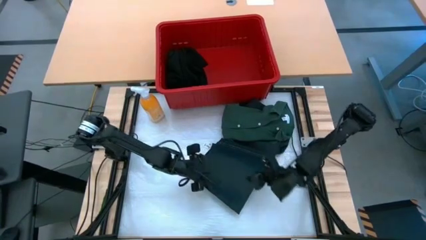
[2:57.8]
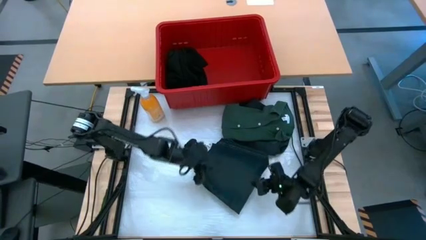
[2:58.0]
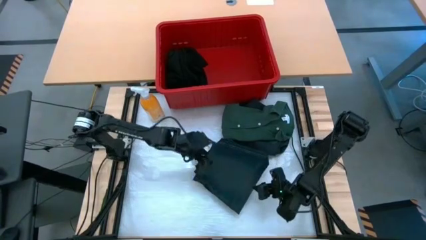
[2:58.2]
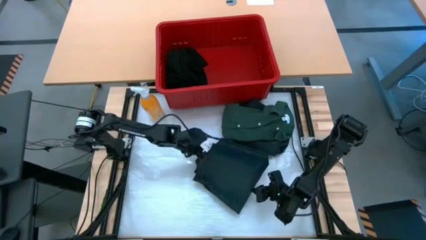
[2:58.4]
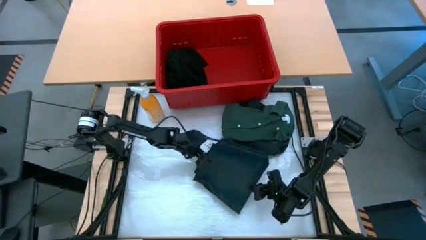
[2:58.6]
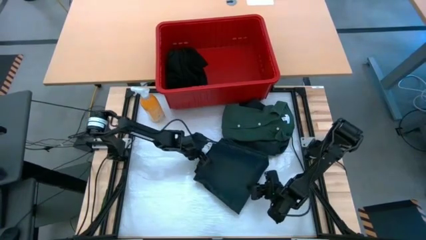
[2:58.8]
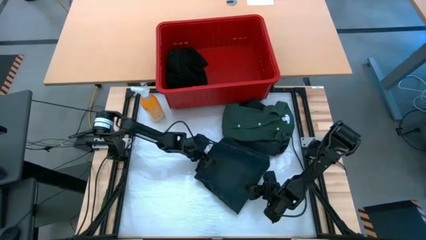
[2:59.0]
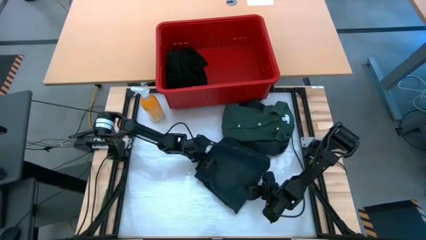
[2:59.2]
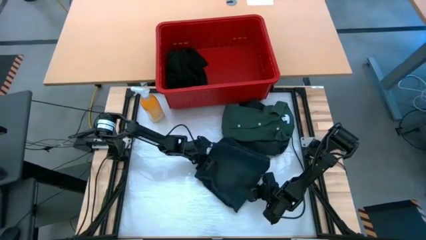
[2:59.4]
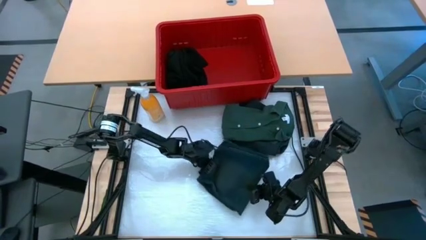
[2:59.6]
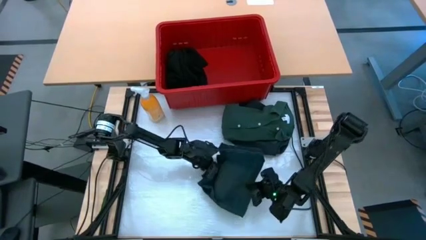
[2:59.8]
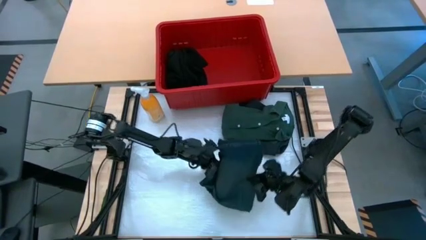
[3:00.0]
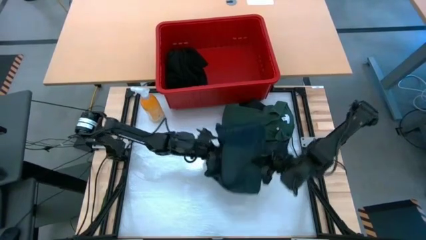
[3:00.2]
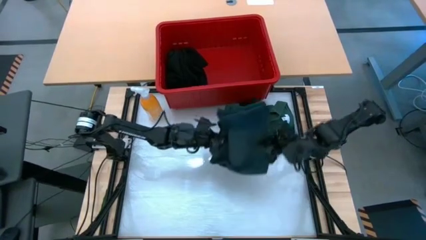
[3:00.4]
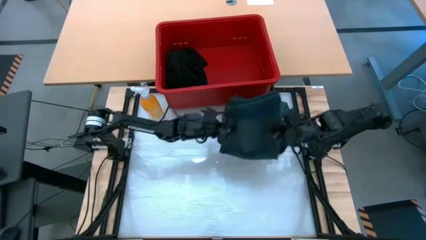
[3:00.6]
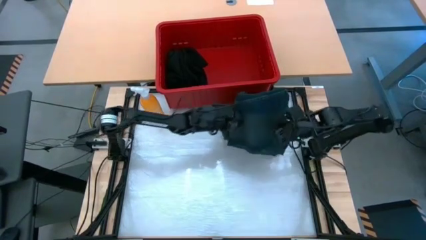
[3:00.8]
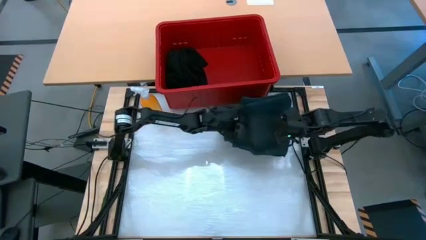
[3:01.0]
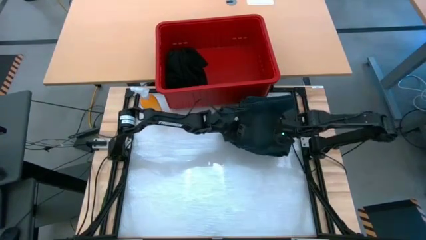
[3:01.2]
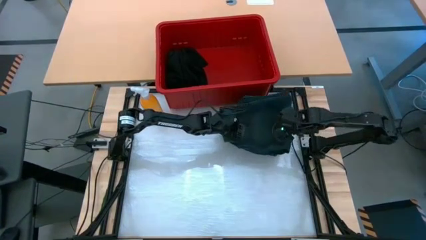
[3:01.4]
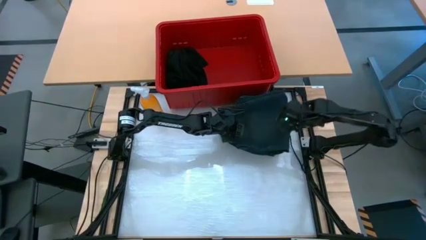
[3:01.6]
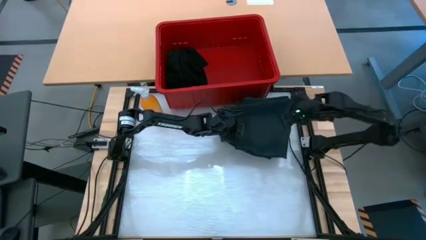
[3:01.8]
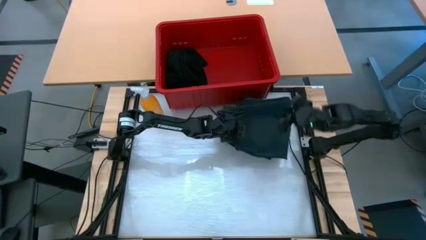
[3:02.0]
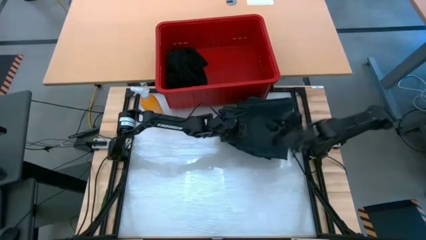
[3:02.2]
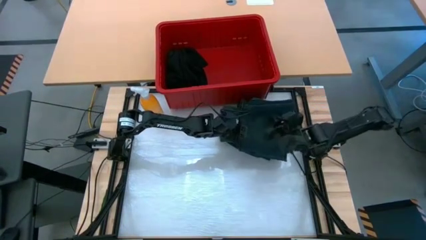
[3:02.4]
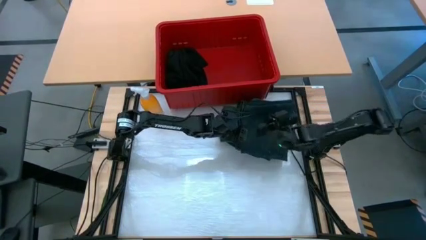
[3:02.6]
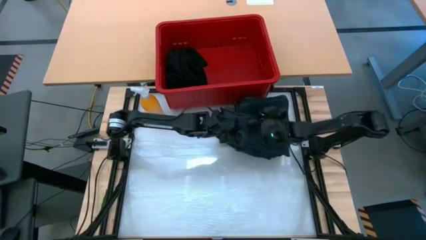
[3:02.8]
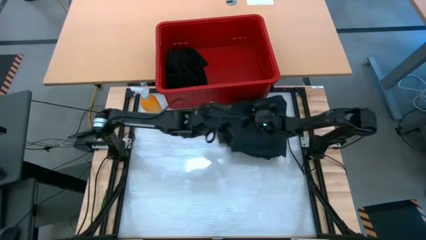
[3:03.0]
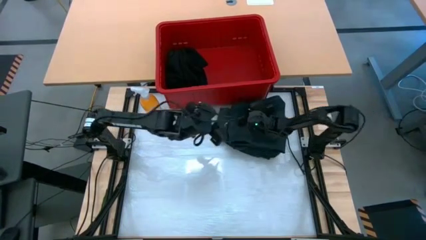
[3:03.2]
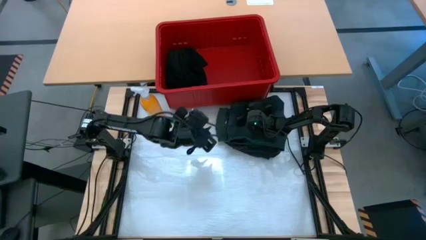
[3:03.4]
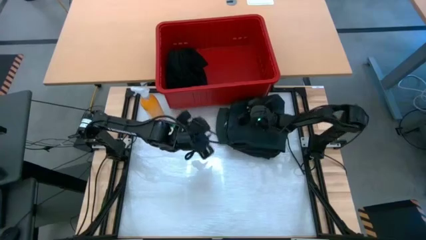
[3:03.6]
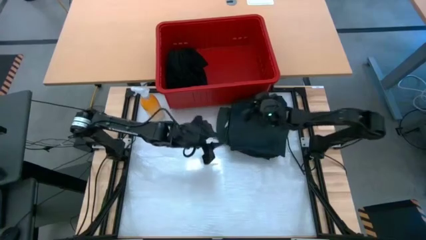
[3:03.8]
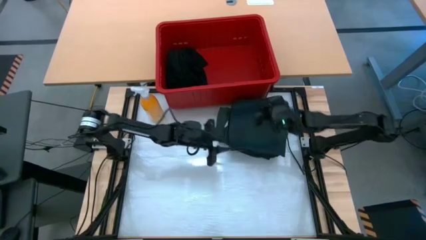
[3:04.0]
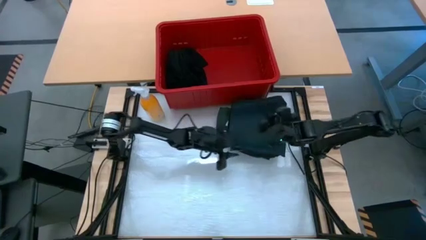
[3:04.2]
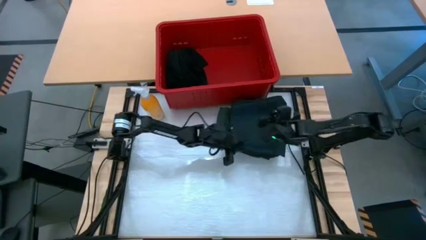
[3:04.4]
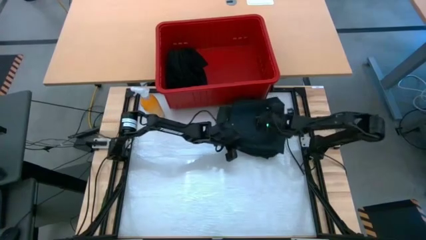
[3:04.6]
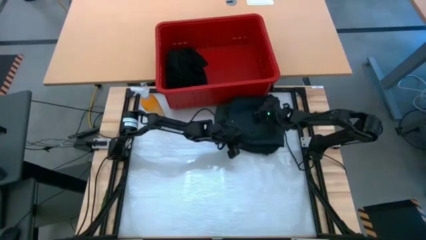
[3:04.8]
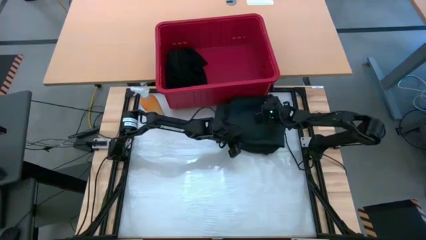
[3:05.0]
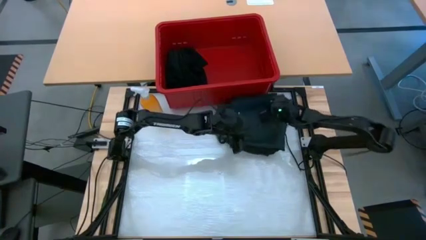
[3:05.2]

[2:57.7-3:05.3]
Task: Fold Laundry from Bin
Stack the blue pants on top of the green polo shirt

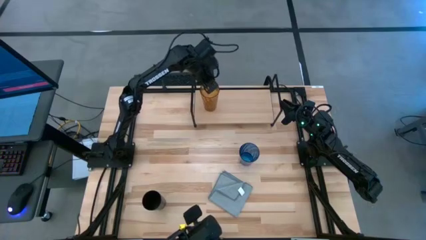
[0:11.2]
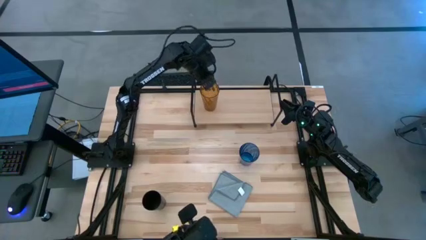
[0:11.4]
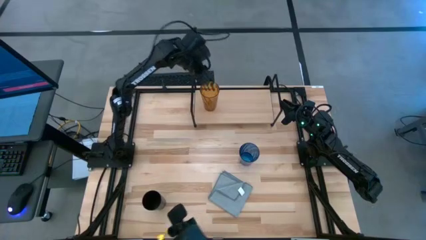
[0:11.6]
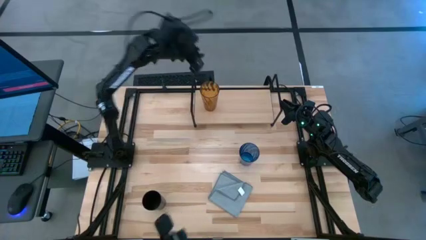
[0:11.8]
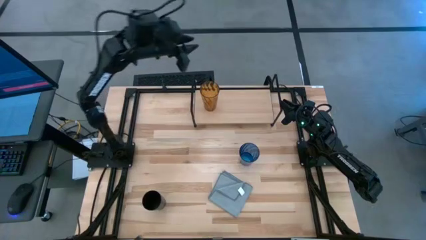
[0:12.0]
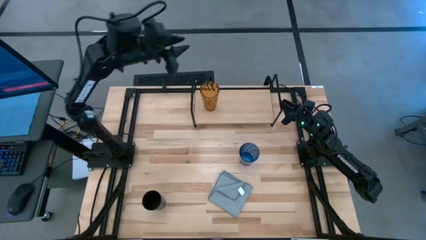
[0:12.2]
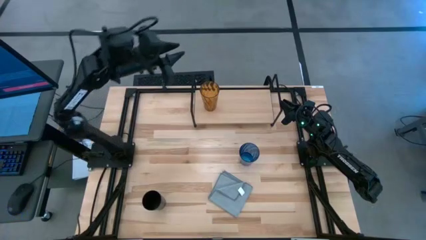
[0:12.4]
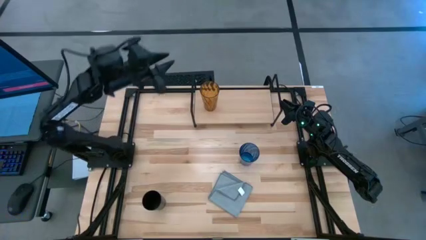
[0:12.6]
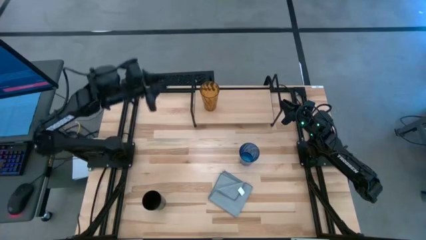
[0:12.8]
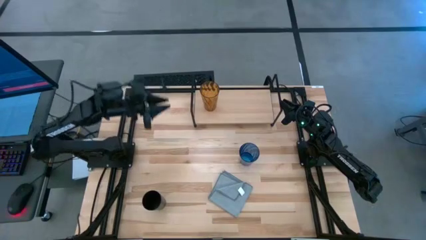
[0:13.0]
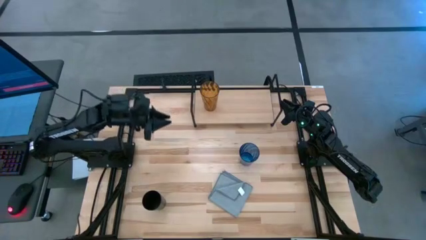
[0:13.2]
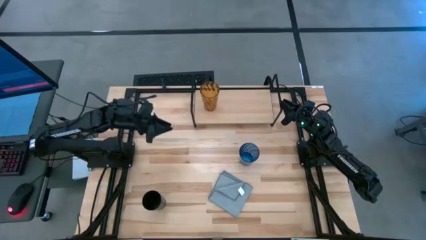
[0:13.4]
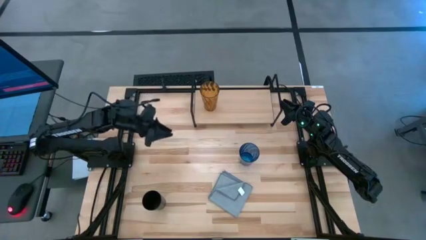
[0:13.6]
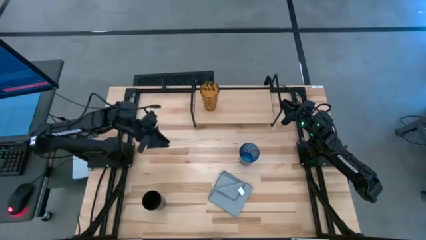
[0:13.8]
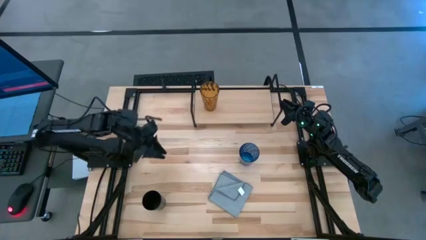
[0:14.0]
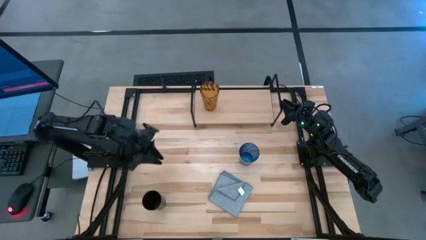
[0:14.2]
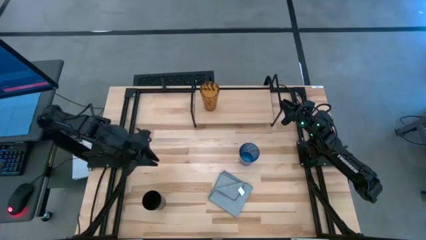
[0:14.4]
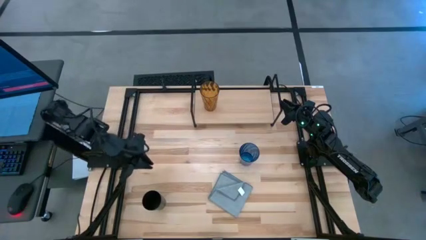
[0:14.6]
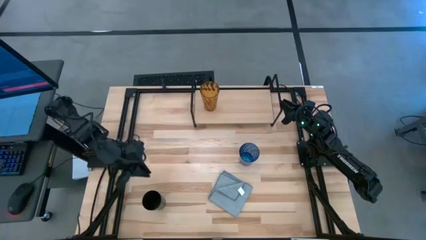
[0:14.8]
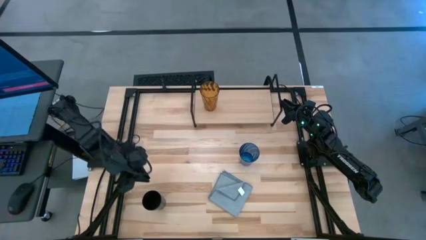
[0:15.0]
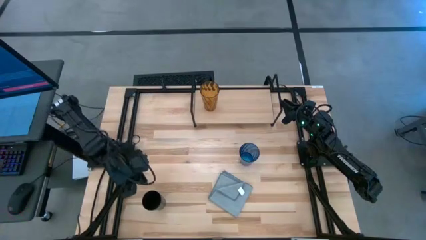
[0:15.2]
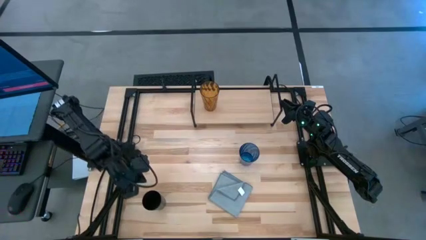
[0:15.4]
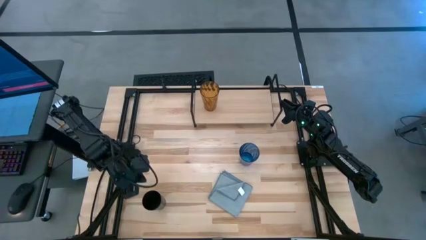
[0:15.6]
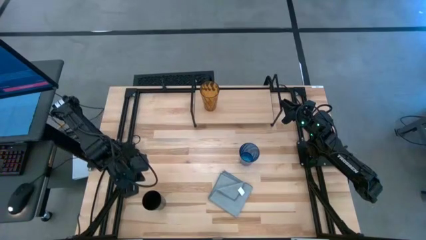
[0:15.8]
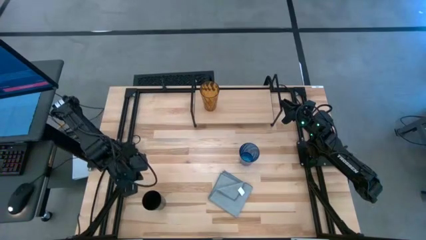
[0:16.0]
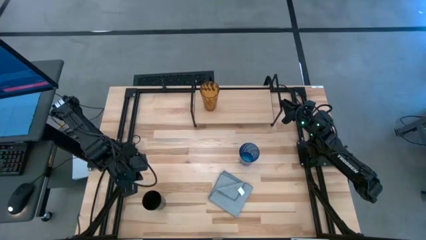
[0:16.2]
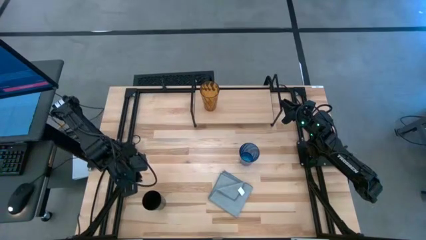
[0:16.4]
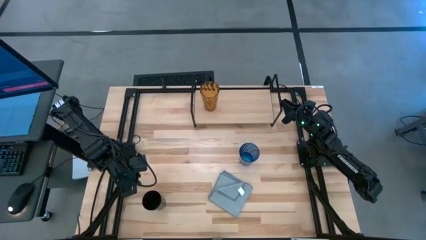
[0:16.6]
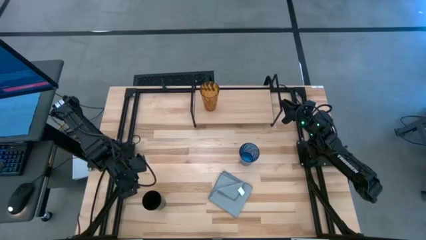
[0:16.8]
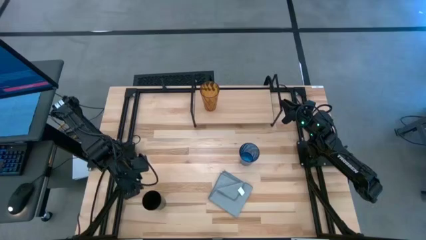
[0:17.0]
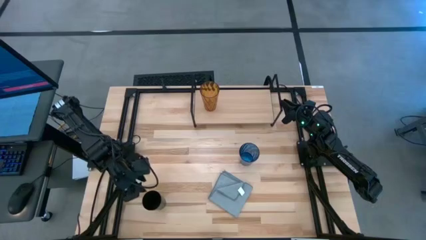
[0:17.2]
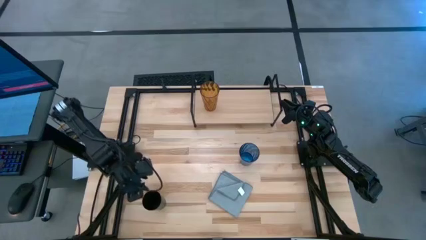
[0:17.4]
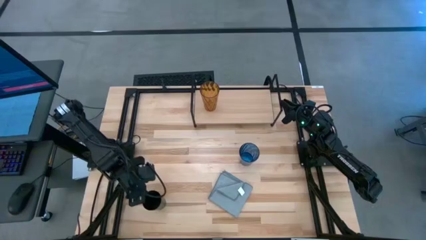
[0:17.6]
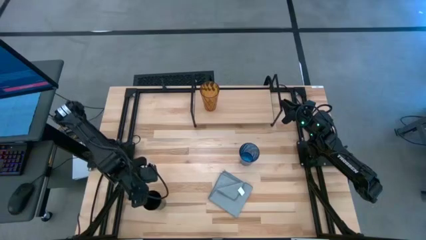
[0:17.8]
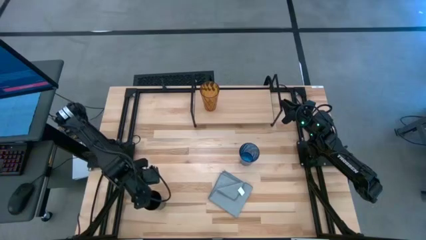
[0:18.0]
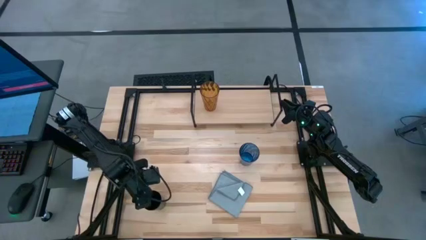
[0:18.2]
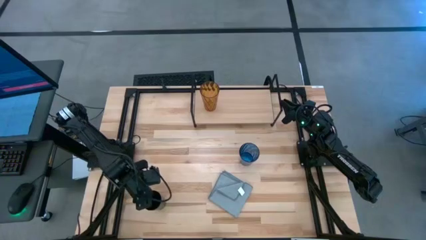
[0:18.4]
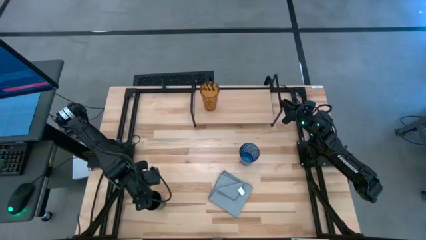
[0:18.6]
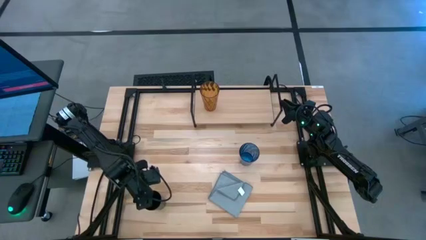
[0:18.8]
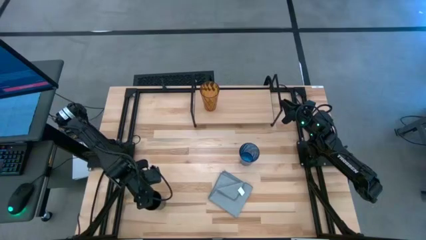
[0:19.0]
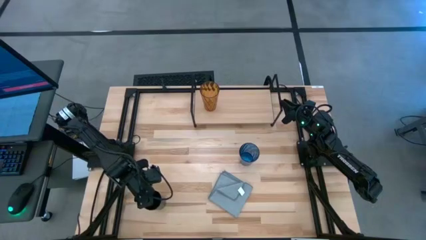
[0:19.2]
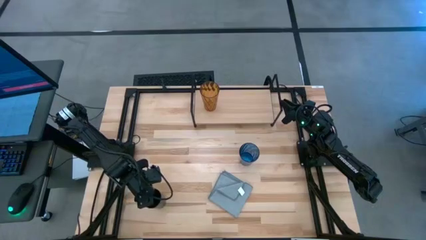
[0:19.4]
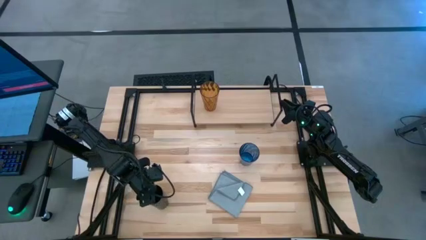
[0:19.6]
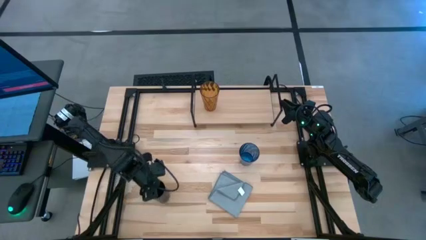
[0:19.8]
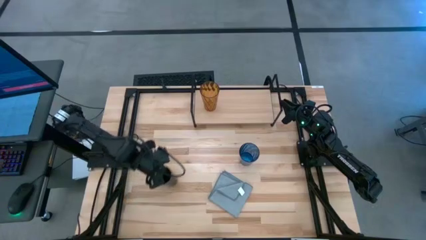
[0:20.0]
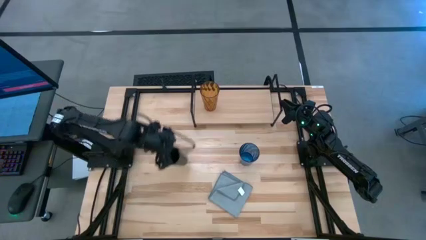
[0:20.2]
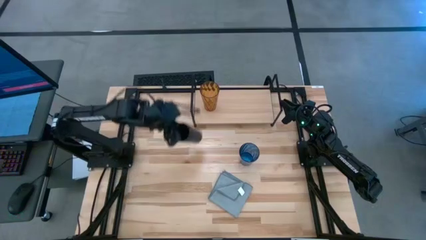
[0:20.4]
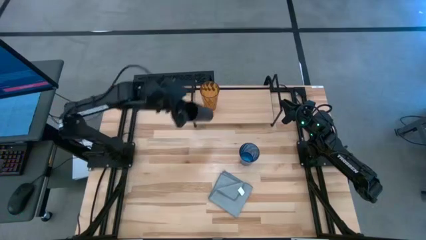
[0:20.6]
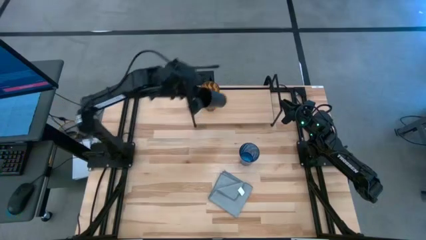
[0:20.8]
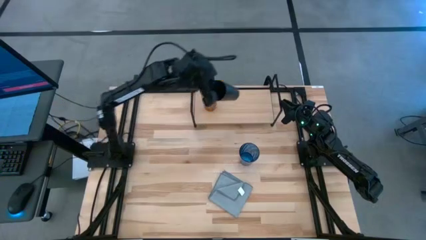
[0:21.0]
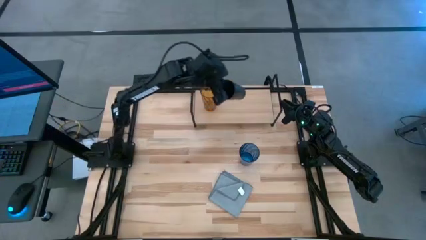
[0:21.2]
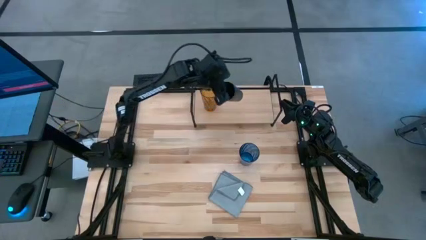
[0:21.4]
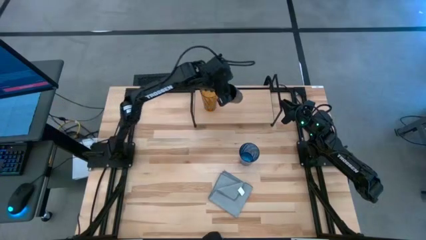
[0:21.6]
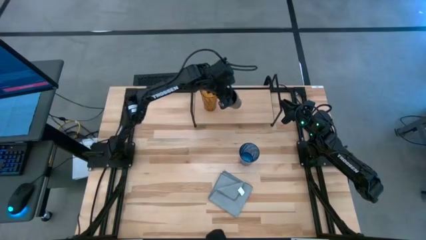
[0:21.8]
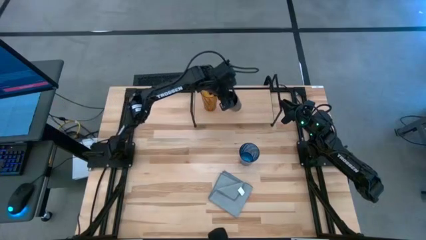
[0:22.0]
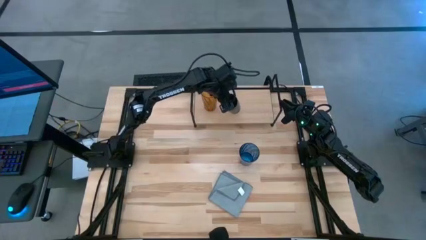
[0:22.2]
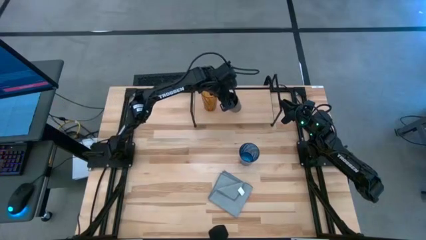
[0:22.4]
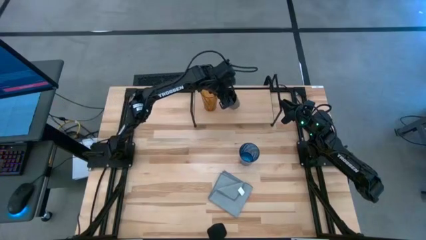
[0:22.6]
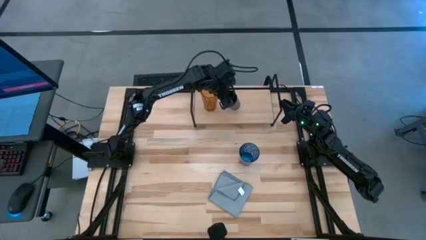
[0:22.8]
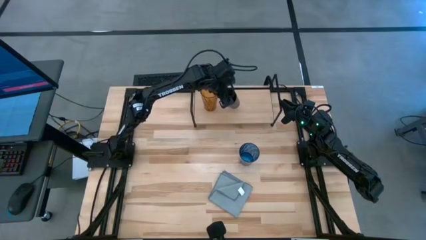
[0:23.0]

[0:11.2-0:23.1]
Task: Stack small to large cups/mugs on shelf
Put the black cup on the shelf
